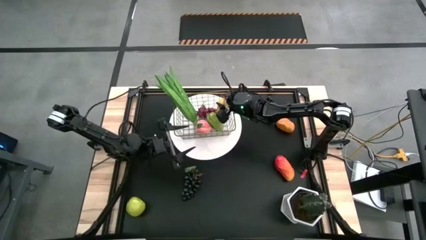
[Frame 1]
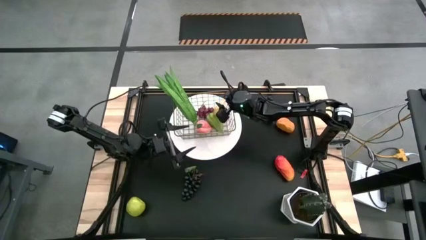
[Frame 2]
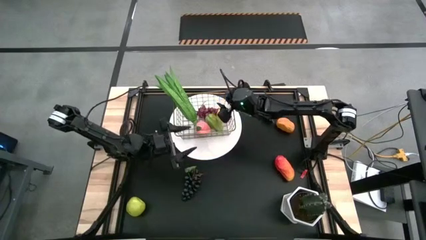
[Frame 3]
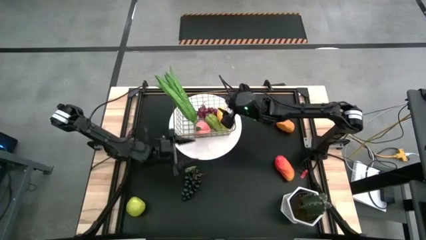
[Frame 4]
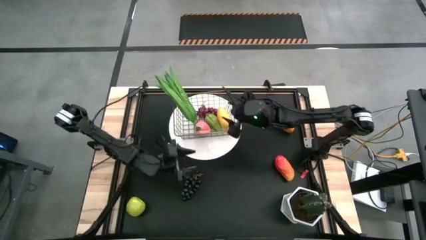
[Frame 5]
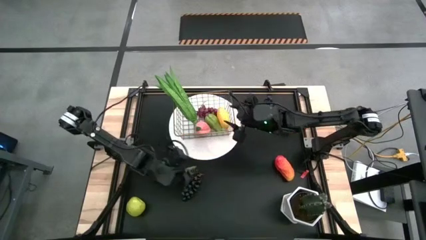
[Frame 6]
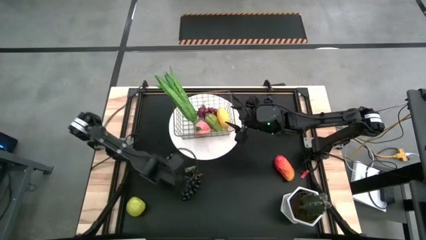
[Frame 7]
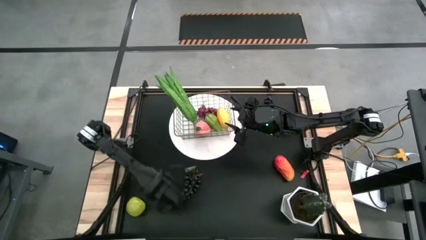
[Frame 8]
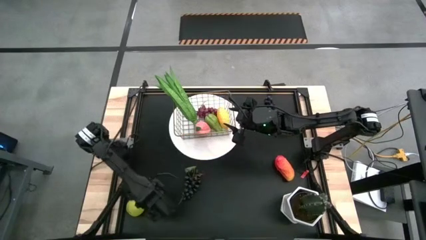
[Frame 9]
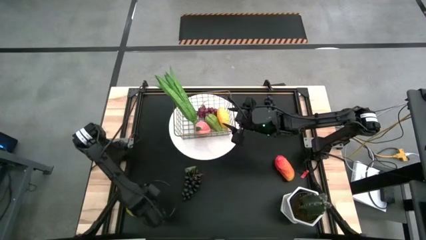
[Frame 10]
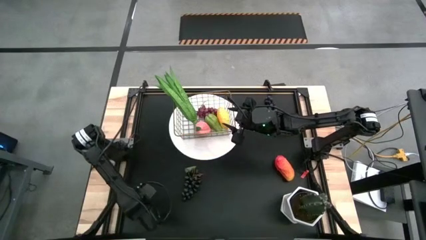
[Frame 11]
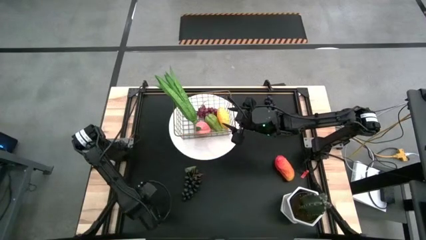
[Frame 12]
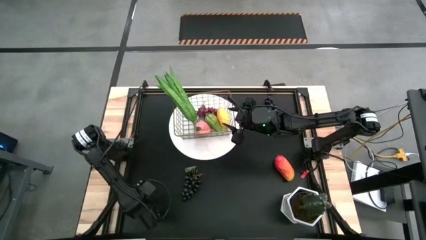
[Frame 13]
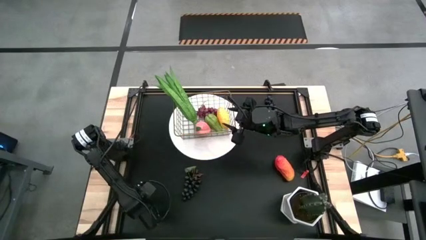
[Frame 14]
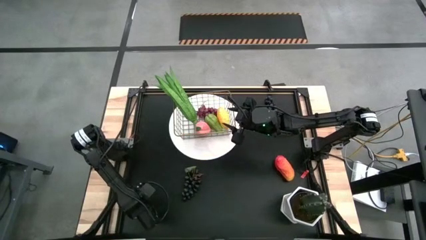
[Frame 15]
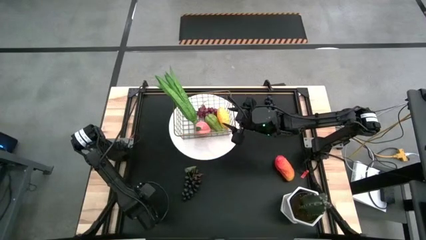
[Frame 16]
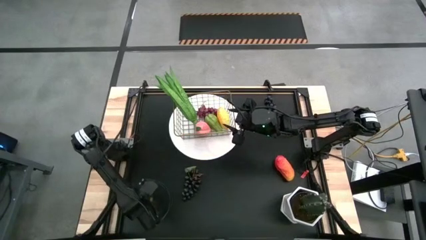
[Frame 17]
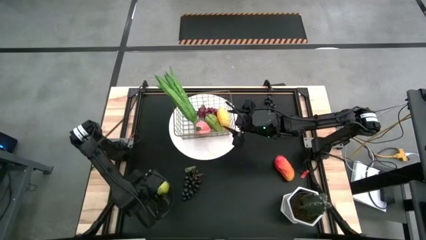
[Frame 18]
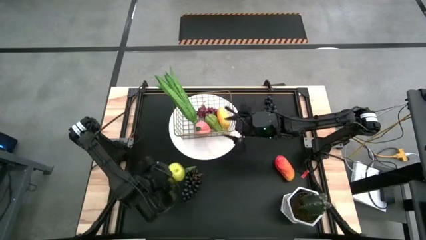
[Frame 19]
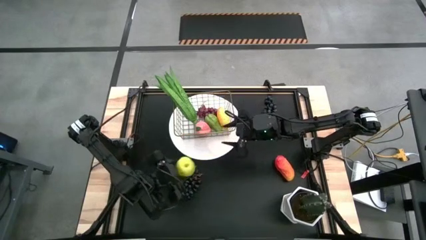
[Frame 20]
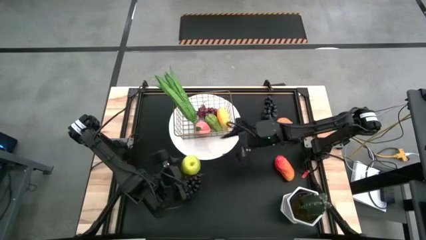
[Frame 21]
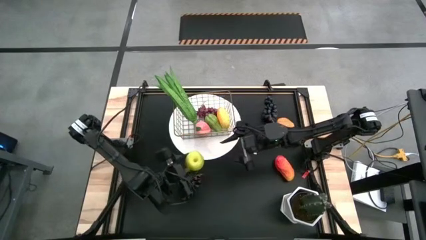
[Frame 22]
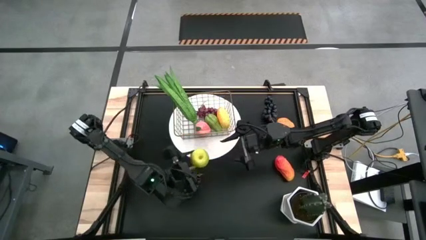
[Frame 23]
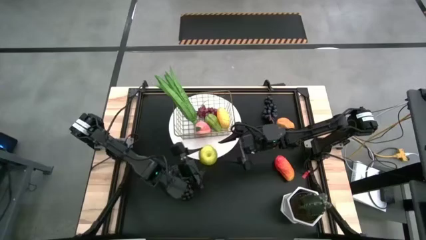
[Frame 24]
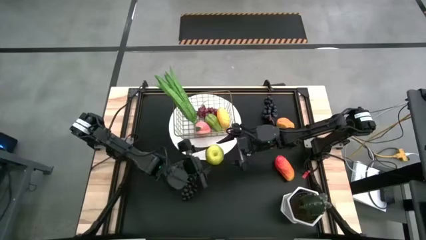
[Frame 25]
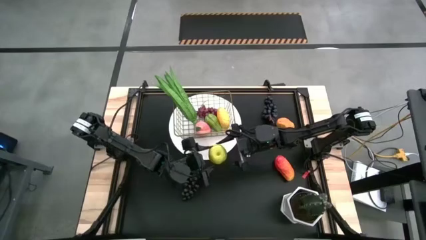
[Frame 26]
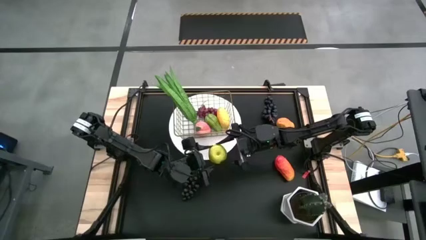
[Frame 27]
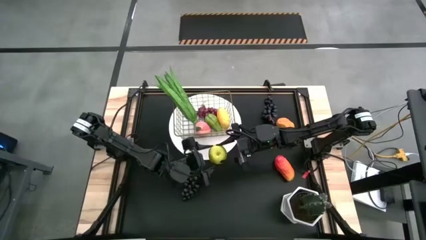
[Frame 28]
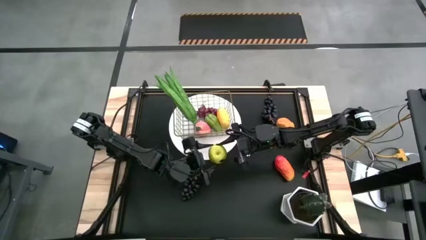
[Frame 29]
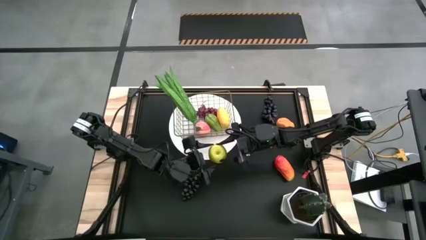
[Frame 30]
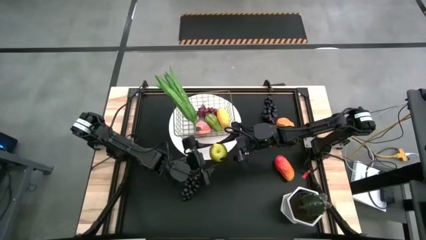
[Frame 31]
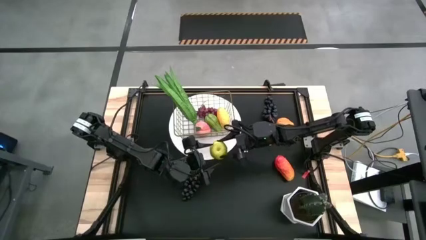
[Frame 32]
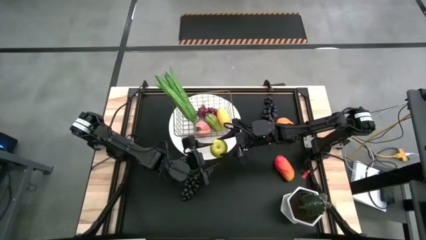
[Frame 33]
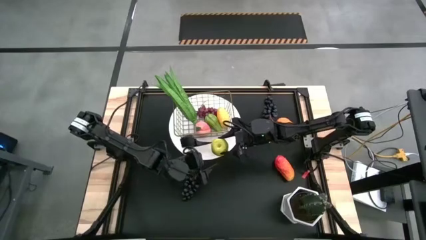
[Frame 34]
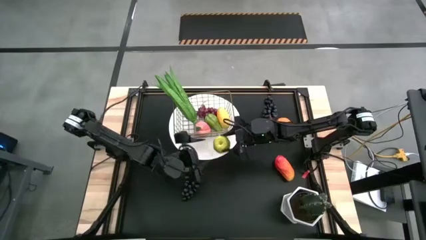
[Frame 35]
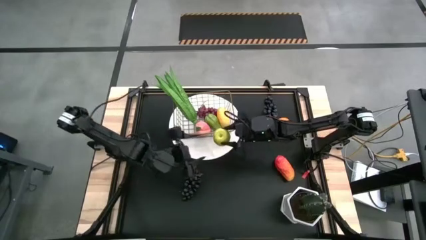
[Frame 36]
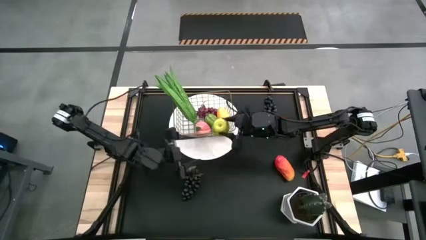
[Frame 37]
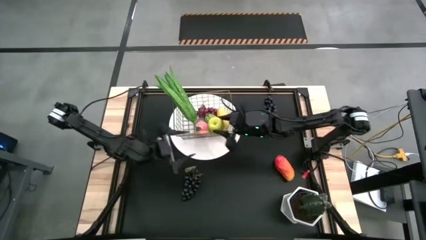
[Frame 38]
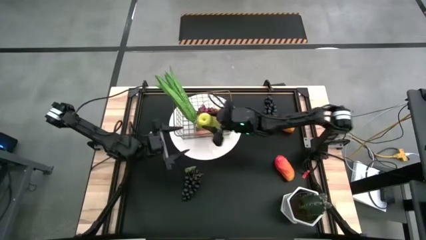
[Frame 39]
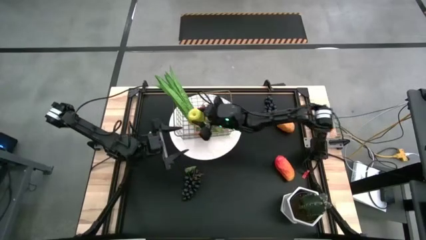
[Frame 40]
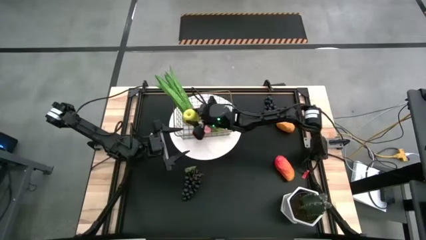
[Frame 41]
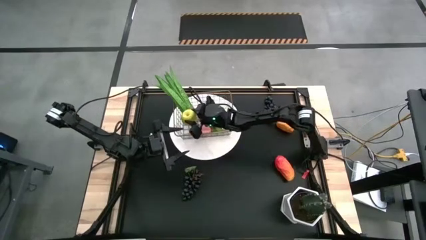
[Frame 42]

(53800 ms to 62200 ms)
Task: Build produce basket
Put the green apple into the gold wire basket

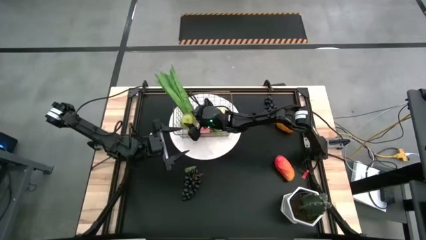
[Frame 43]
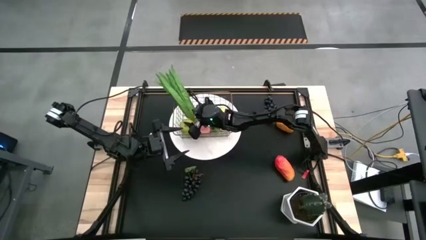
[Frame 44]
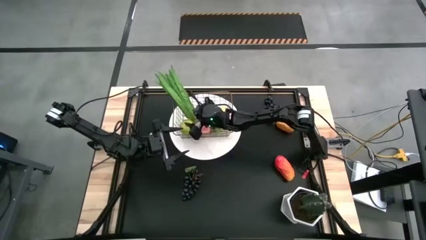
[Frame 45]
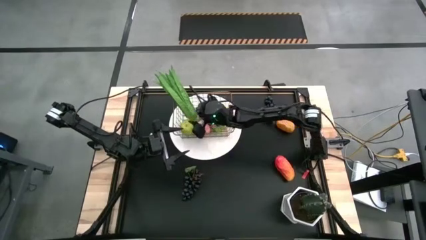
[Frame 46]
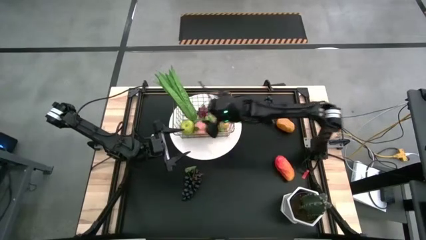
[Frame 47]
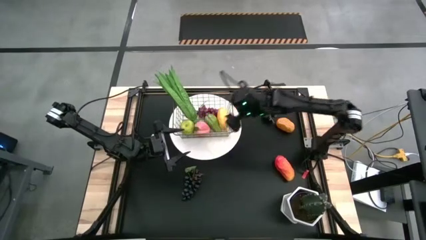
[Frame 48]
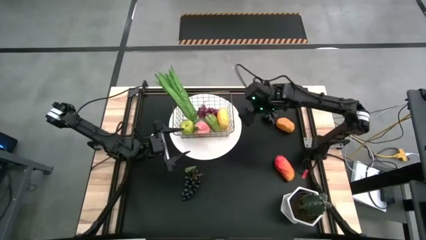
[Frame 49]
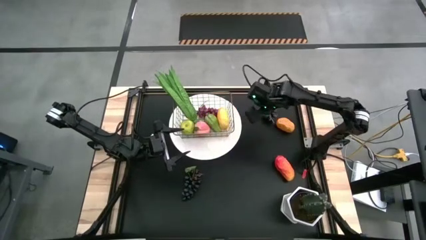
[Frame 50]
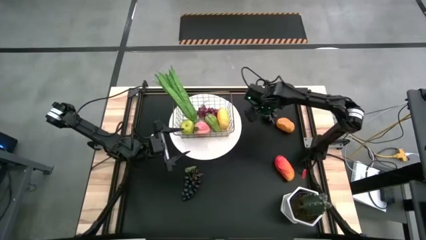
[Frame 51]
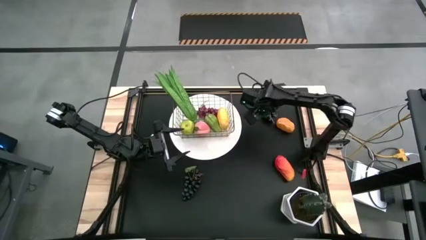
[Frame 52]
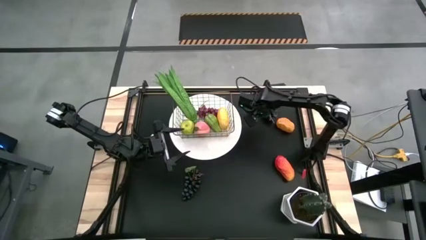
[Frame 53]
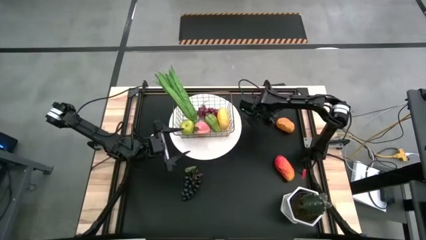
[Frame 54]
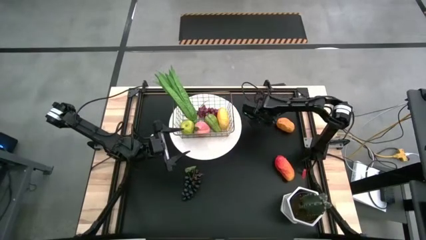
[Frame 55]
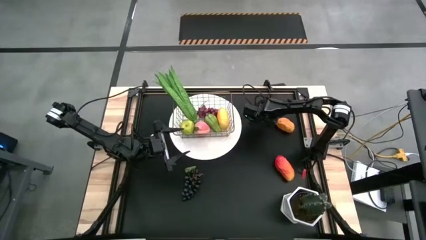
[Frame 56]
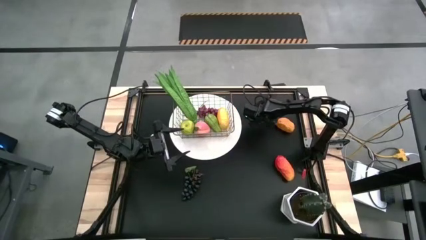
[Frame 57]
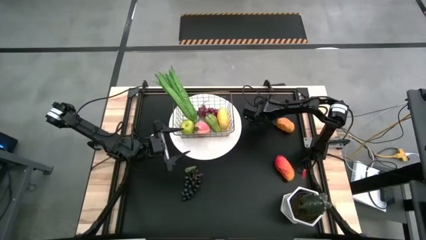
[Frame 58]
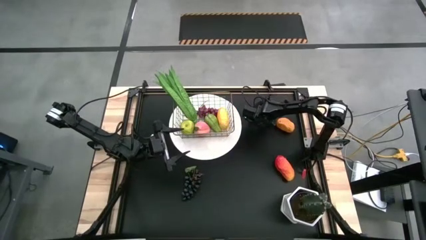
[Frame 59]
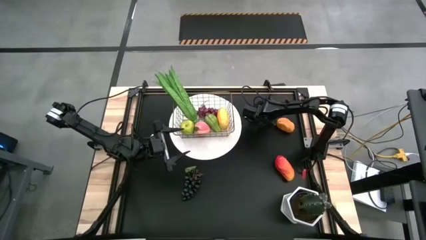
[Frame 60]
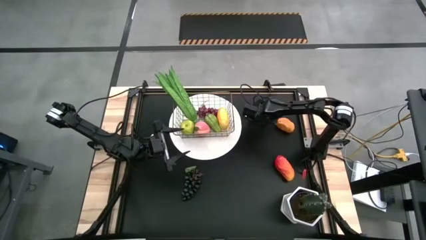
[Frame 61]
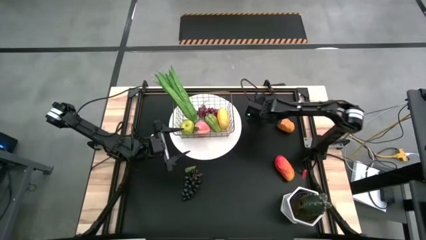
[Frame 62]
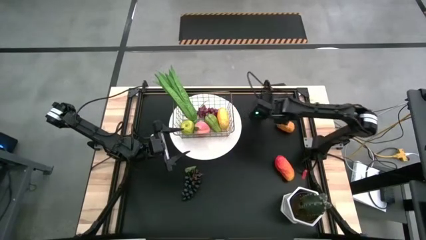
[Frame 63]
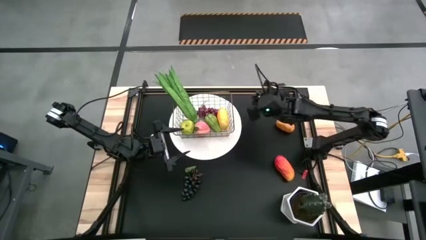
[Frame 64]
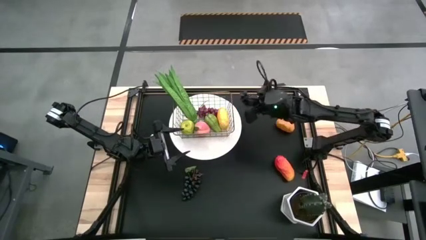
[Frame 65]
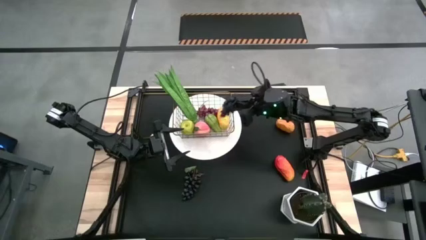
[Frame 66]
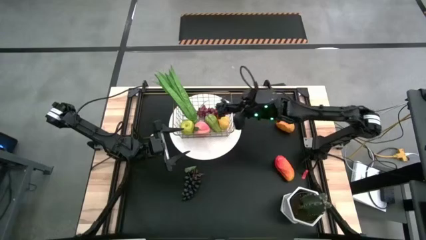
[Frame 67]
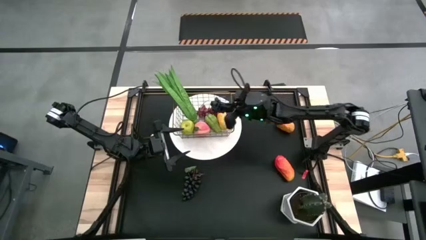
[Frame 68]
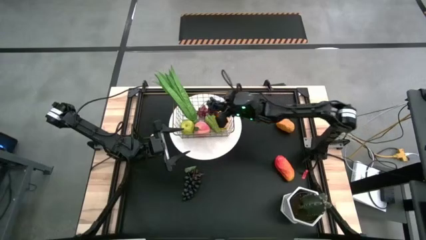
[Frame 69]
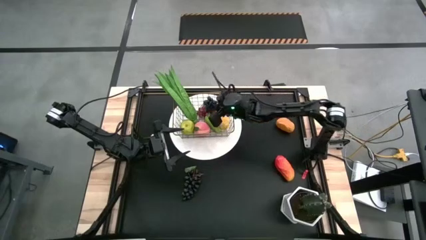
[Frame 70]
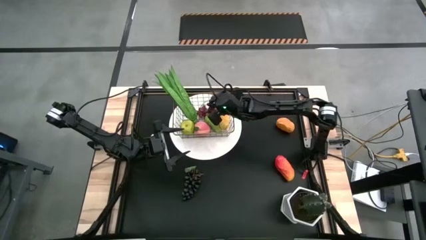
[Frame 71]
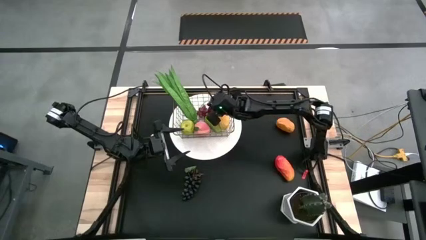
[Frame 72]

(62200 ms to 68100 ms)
Put the top black grapes into the gold wire basket
